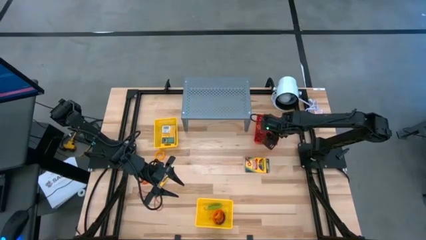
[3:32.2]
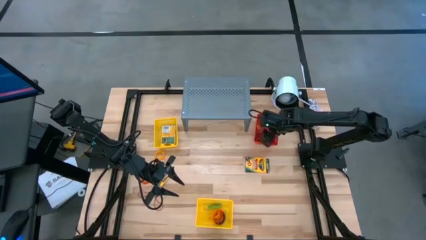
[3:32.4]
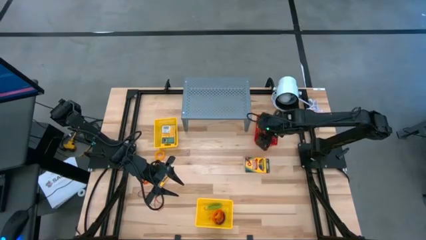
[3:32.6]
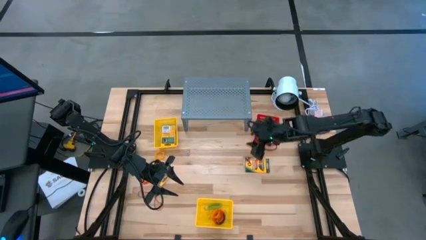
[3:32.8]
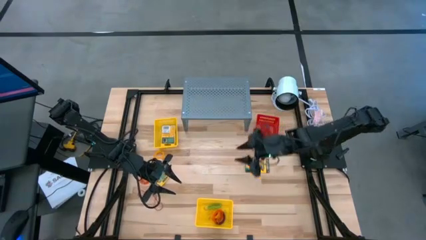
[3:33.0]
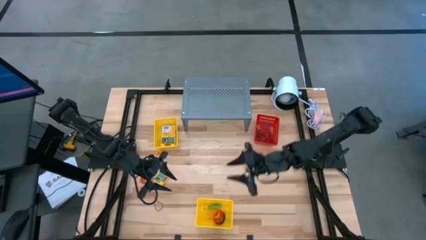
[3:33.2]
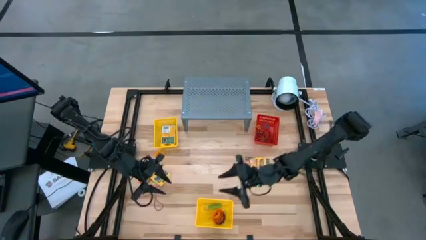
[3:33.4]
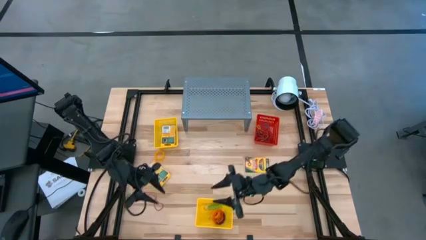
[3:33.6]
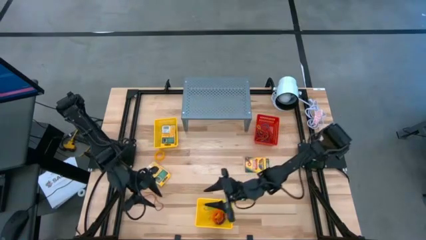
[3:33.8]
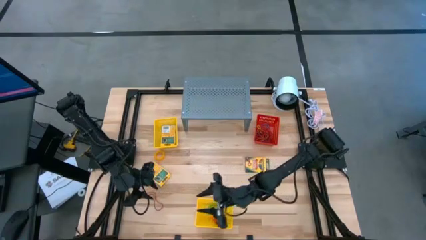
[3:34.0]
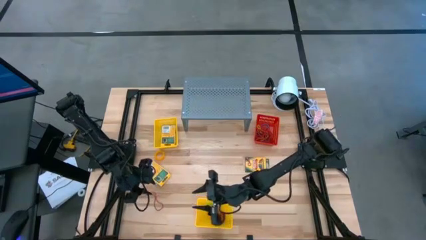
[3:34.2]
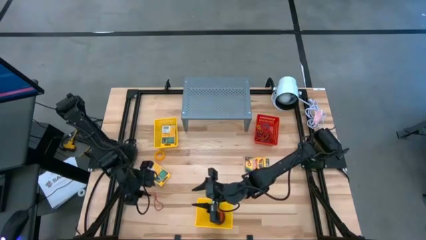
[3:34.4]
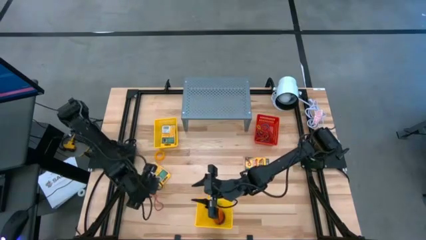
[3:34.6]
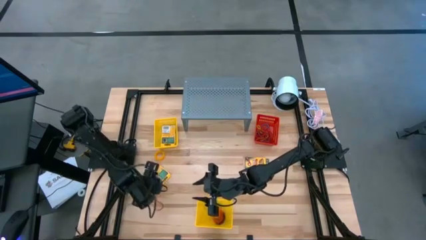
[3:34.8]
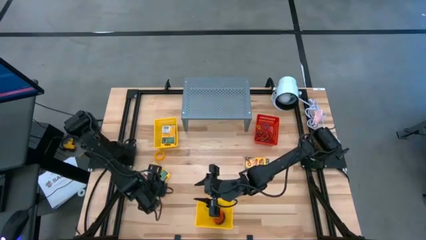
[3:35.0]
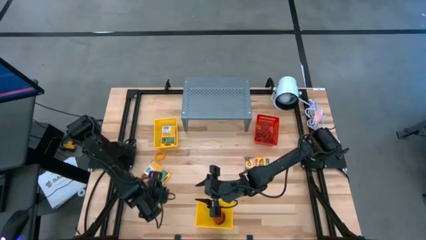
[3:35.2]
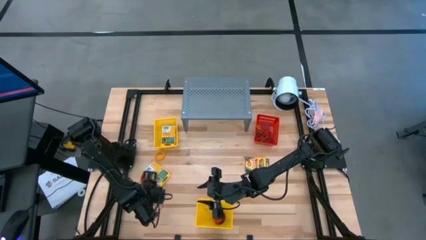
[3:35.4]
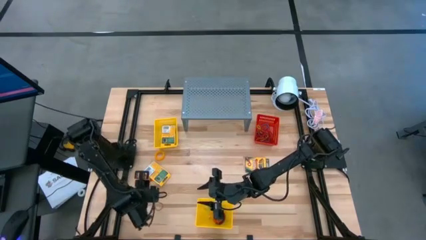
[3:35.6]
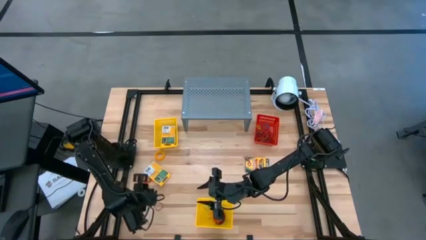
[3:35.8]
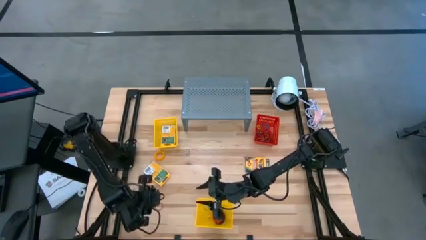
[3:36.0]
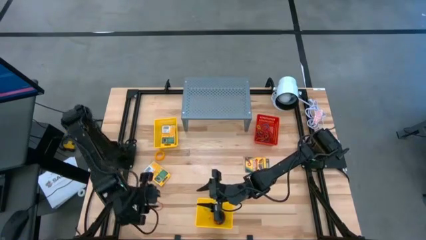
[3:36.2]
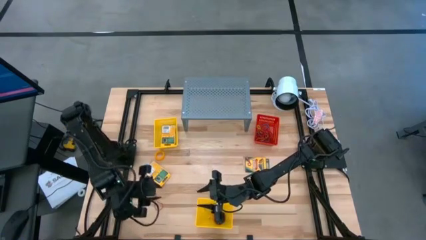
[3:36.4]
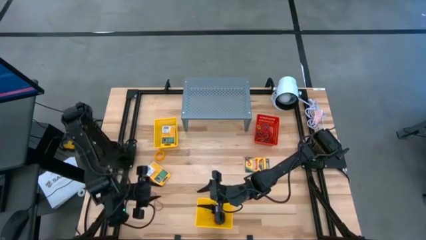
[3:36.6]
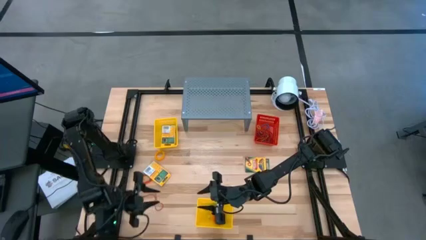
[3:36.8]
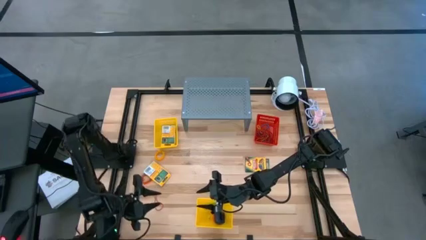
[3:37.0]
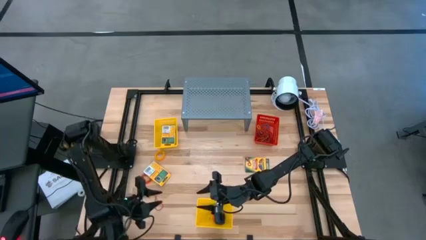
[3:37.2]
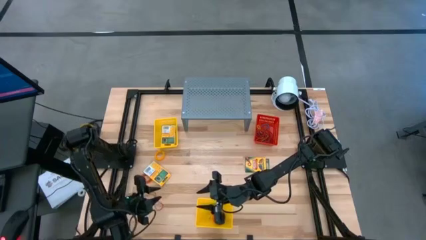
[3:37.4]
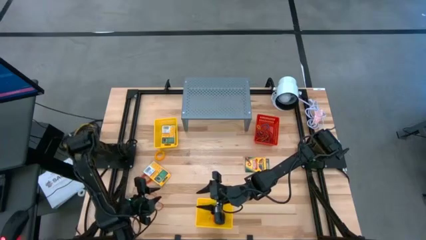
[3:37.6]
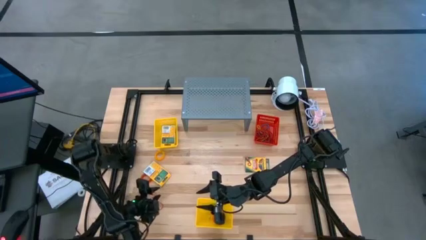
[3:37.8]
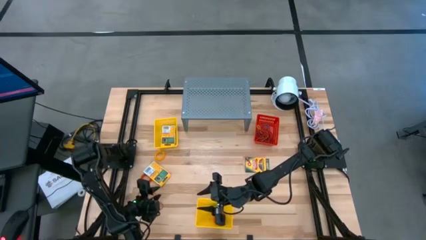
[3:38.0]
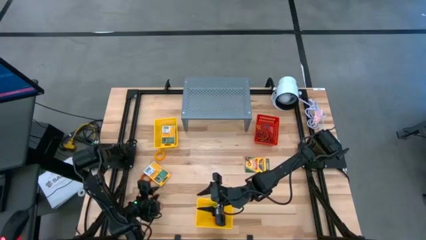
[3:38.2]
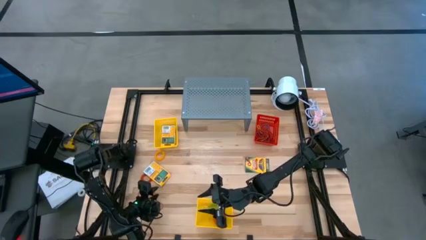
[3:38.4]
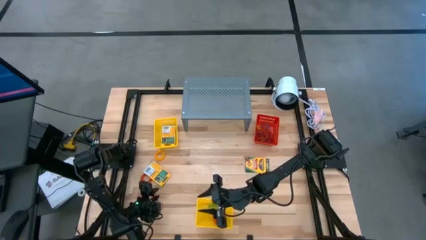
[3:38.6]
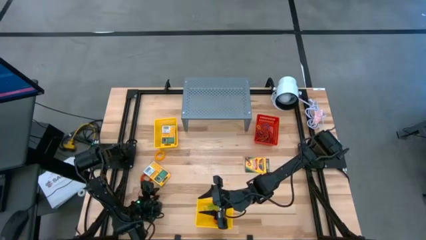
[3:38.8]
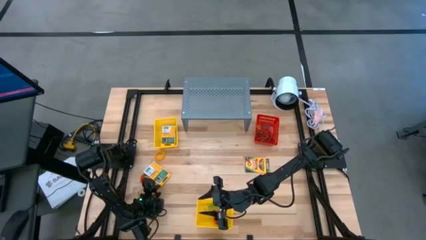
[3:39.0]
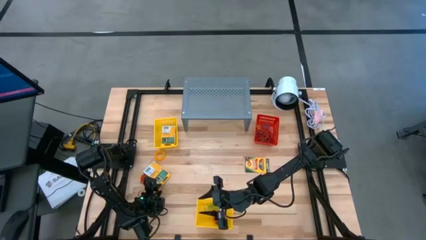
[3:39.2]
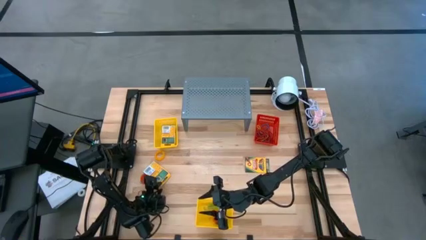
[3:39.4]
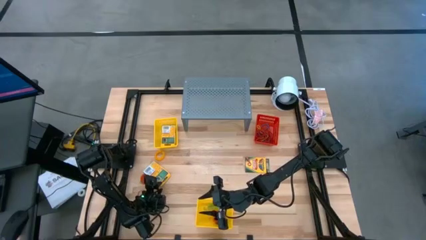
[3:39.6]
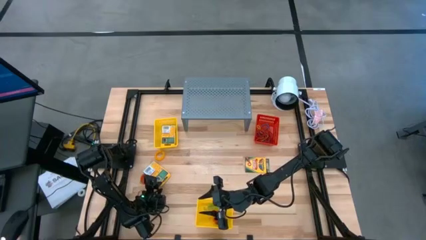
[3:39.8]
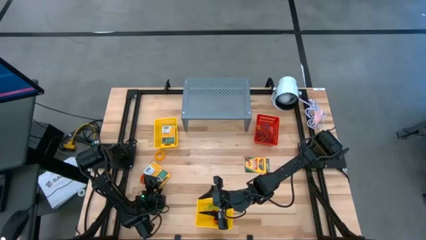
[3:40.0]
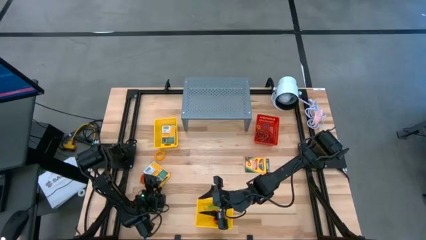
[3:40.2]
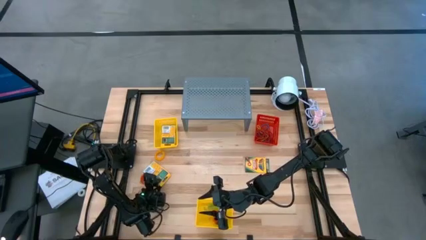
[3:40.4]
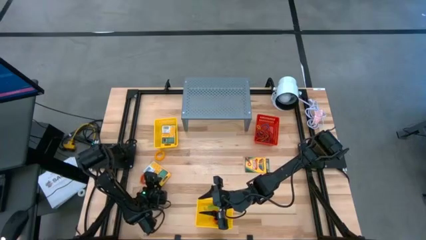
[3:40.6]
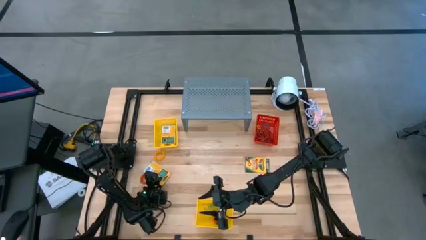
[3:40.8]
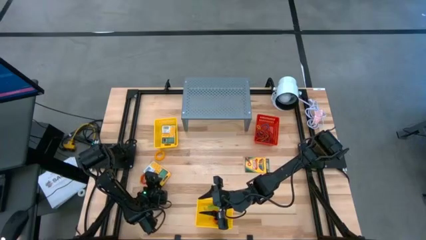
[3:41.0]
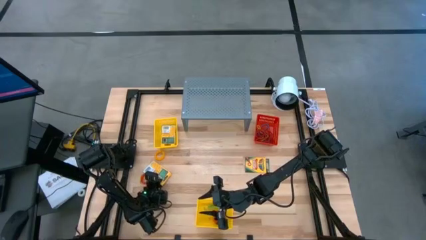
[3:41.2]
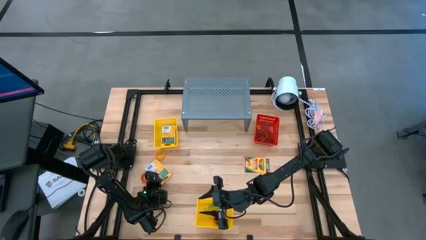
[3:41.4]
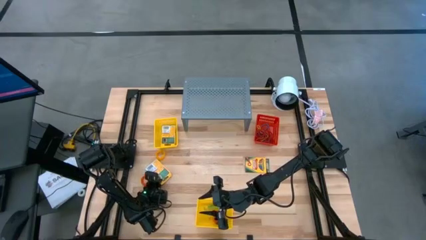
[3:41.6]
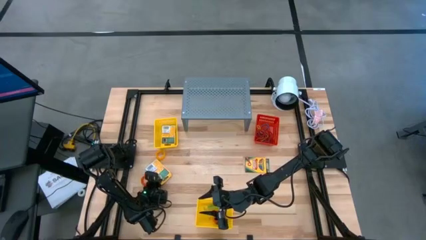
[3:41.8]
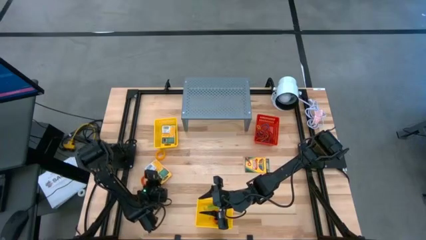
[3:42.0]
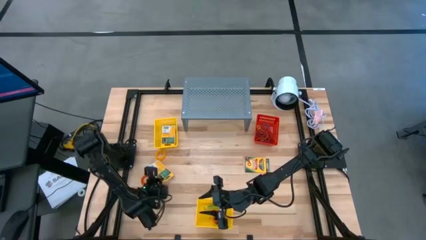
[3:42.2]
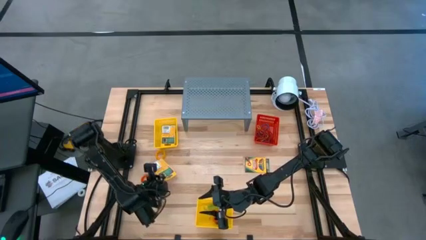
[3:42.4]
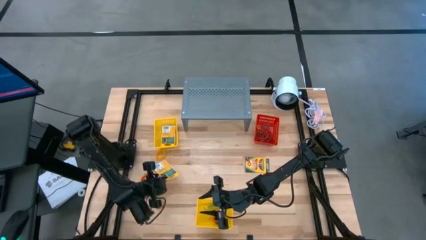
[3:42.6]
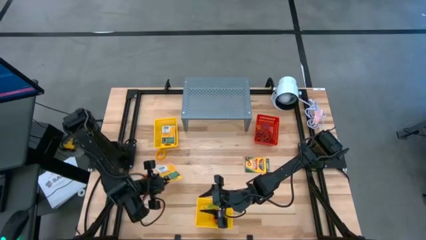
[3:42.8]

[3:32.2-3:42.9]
Task: Pick & Place Office Desk Supplies
Put the yellow crayon box into the top yellow bin
